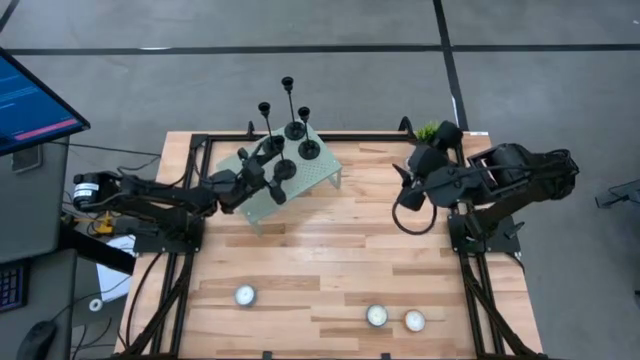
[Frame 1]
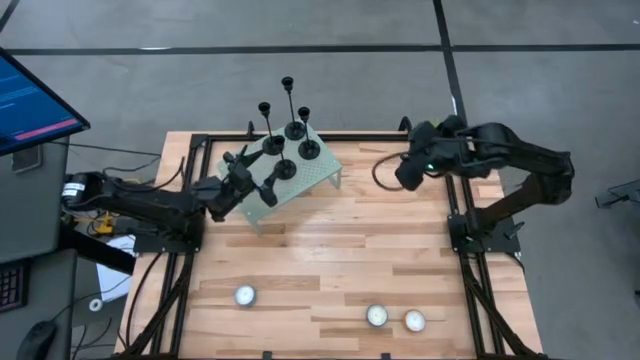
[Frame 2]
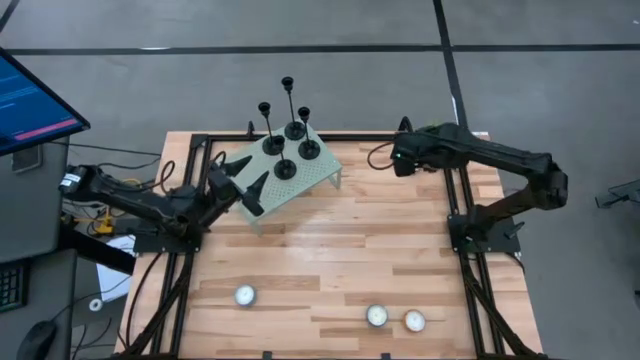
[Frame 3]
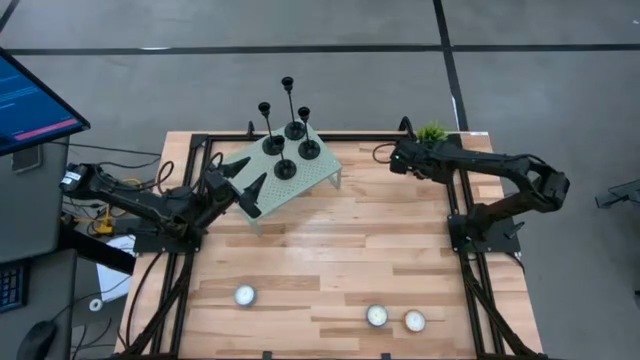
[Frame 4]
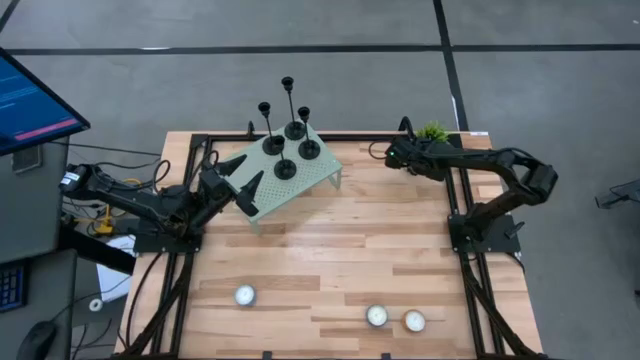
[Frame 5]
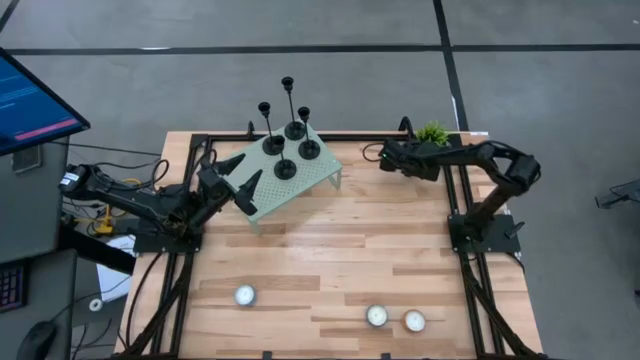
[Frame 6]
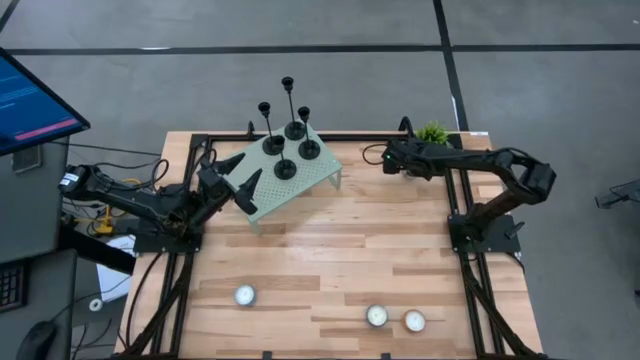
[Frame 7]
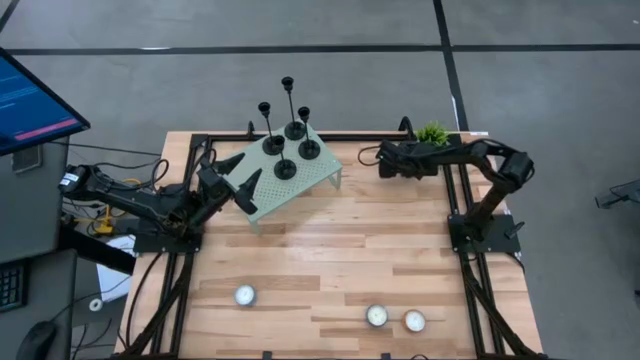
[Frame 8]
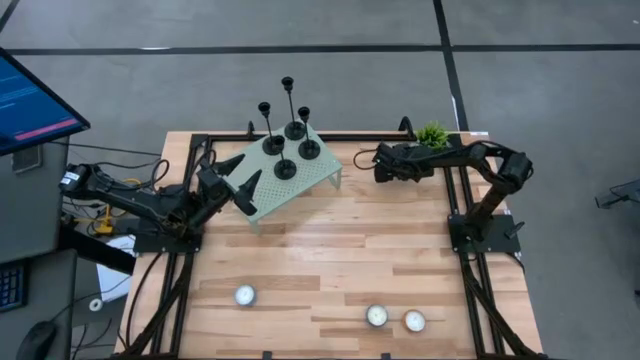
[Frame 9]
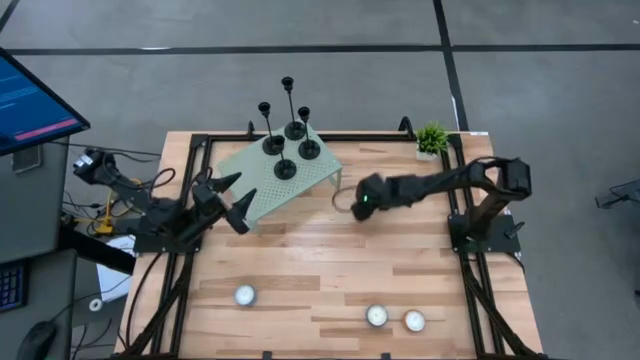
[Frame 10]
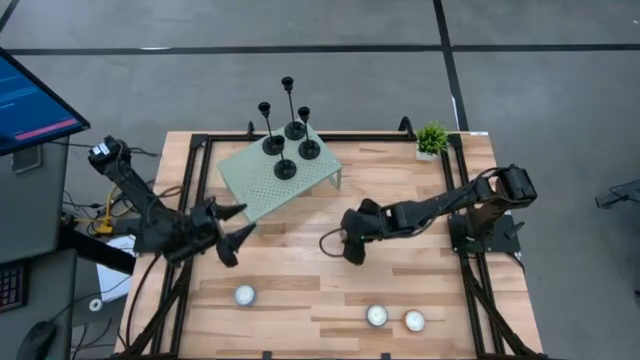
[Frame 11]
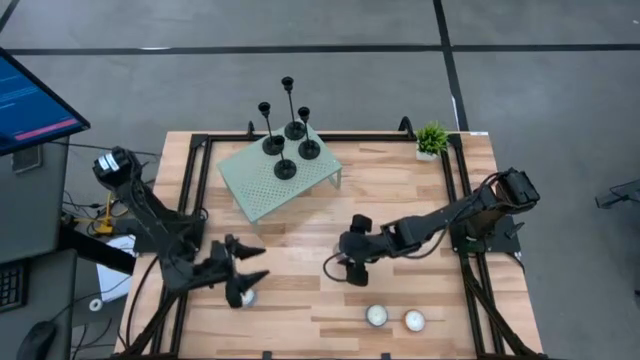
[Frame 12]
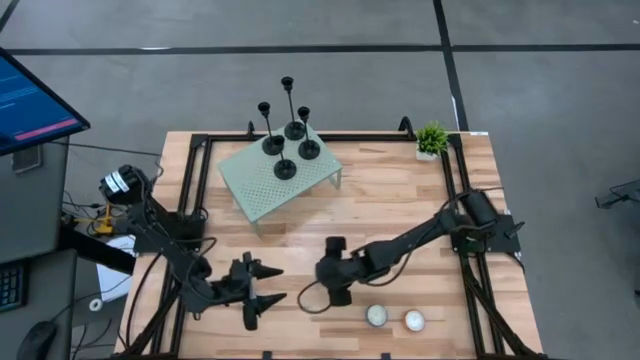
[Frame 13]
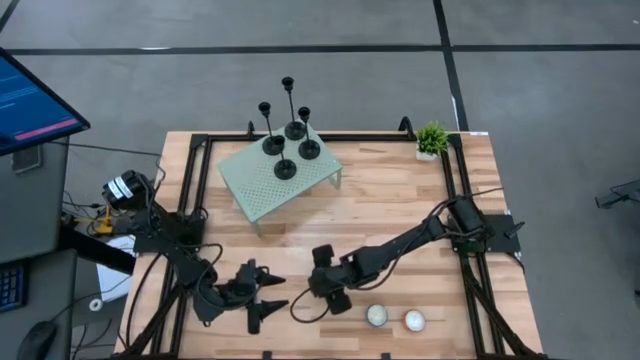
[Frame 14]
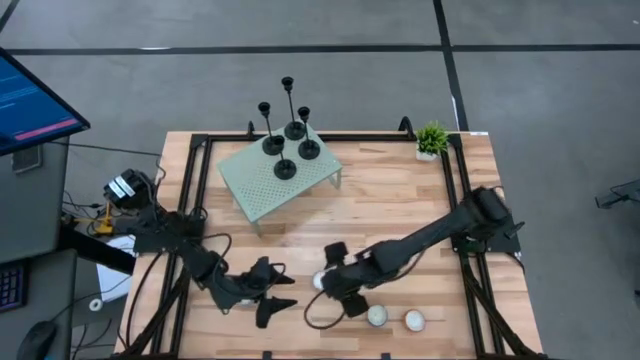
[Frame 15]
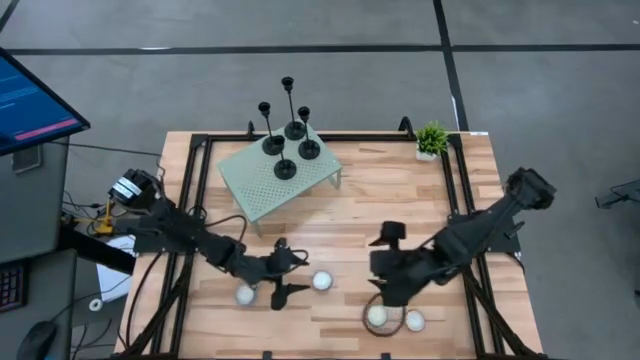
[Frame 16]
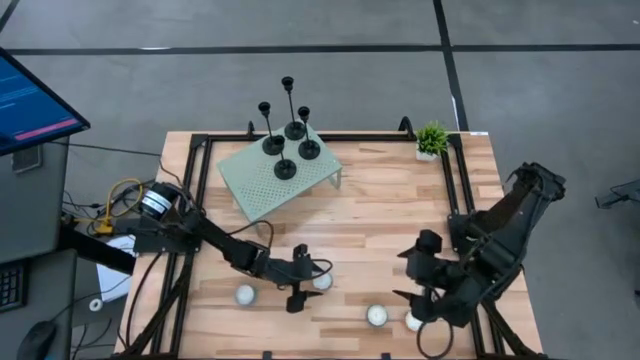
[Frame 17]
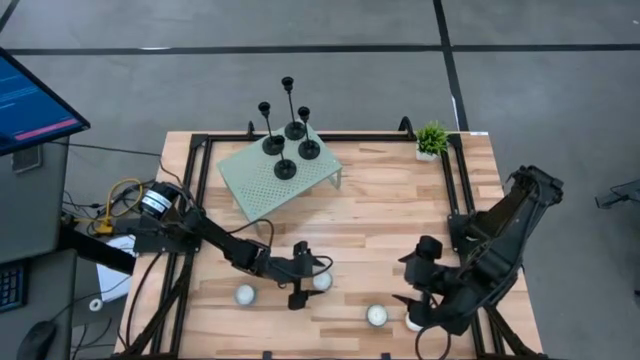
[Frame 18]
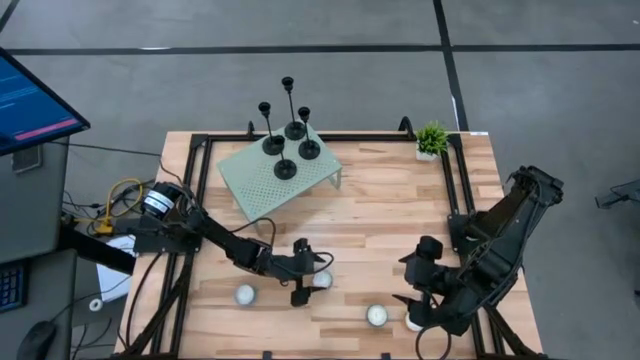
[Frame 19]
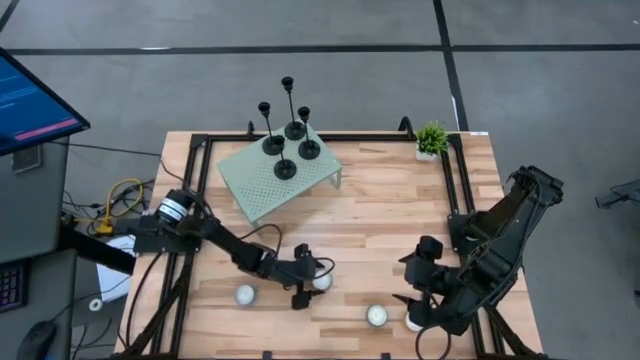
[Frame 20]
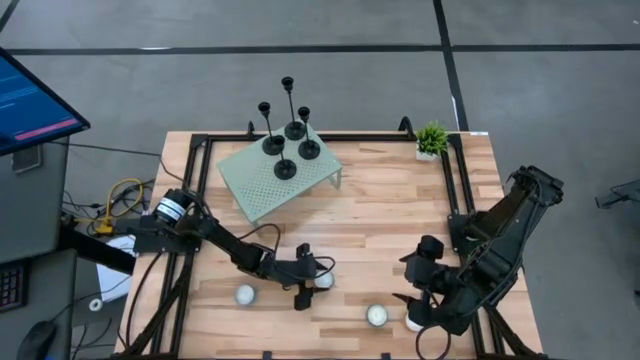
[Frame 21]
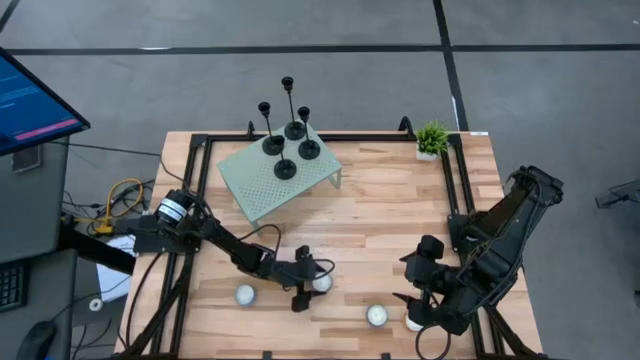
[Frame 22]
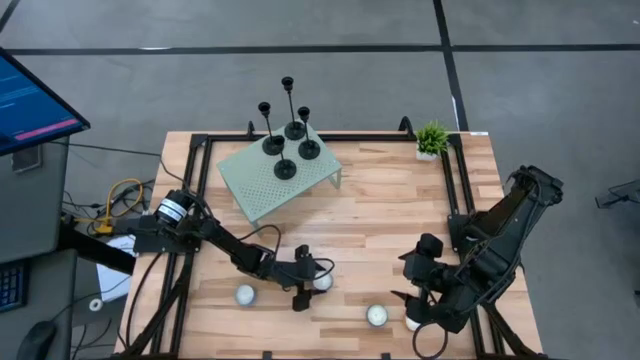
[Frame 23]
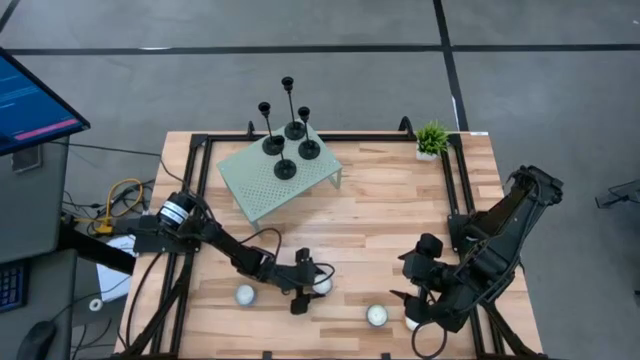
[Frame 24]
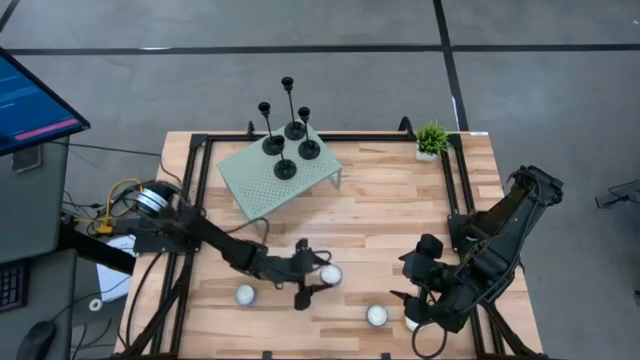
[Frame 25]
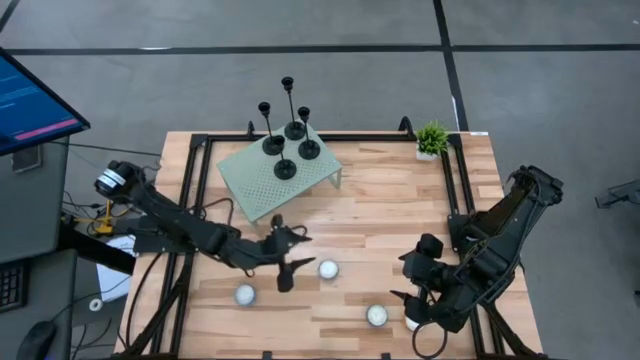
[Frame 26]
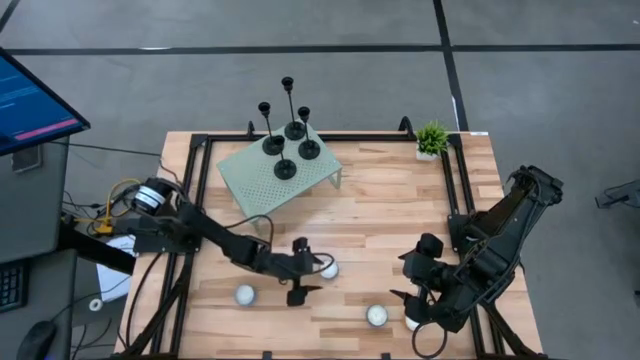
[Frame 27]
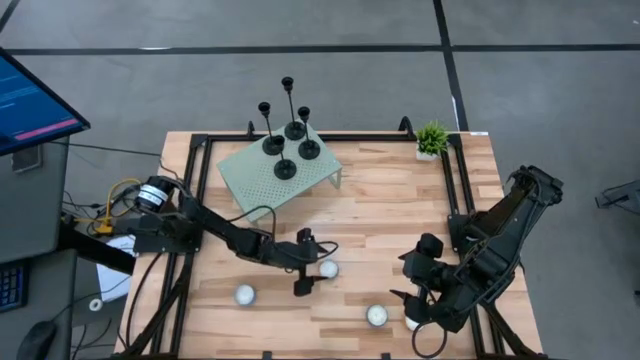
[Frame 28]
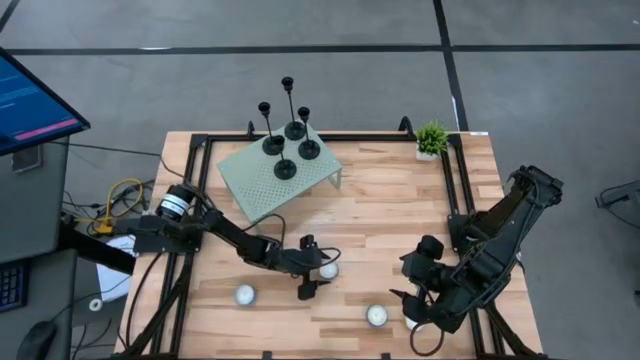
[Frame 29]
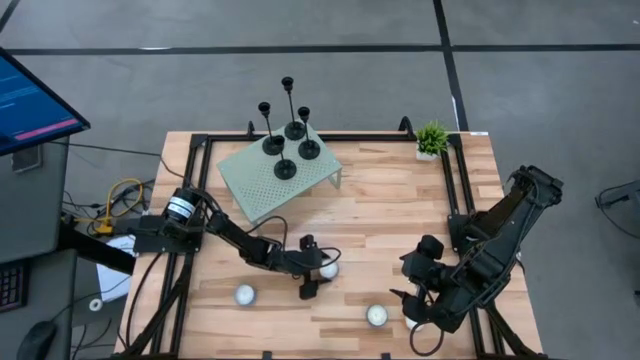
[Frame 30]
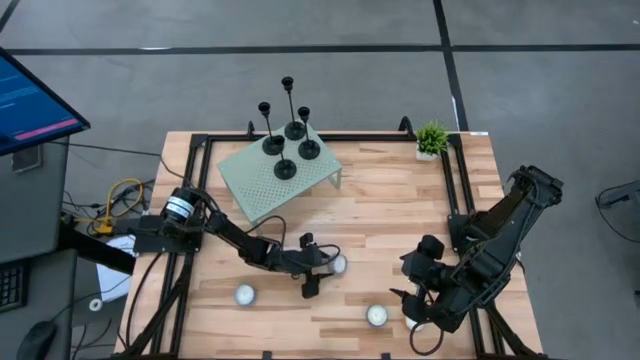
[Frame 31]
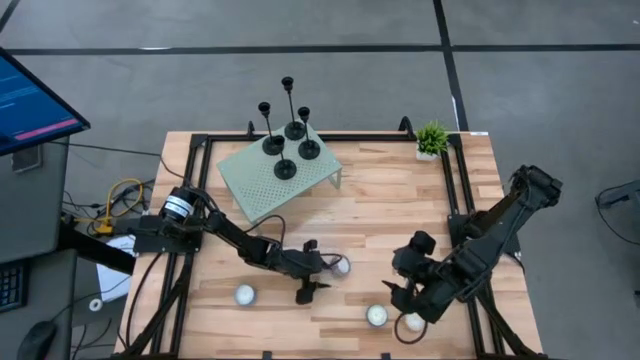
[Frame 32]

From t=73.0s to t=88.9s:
Task: Pick & Place candle stick holders
Put the red patterned scented candle on the shelf

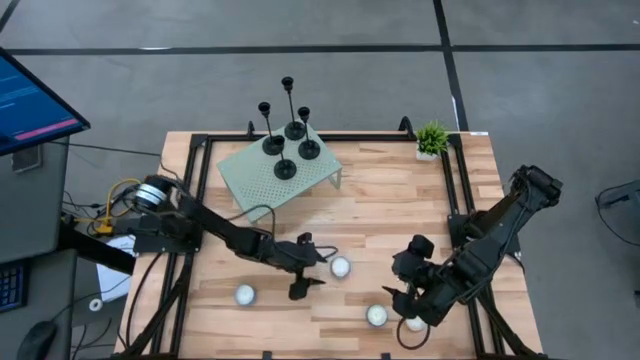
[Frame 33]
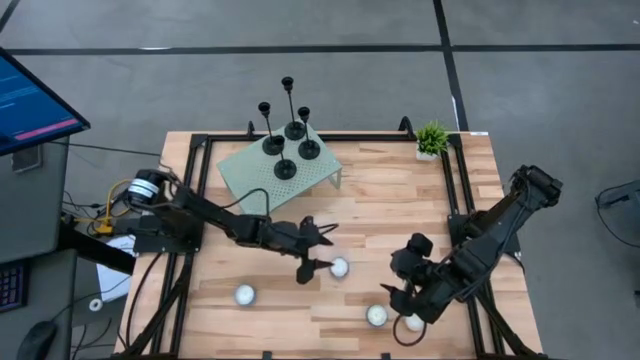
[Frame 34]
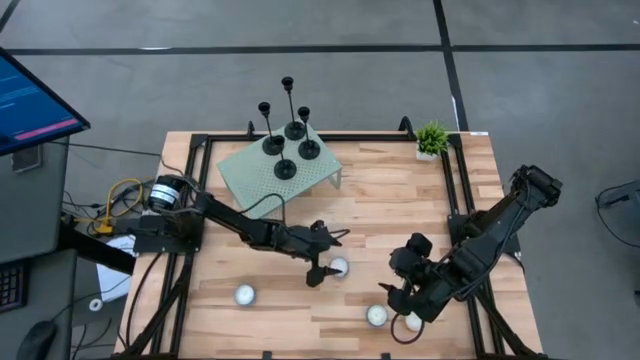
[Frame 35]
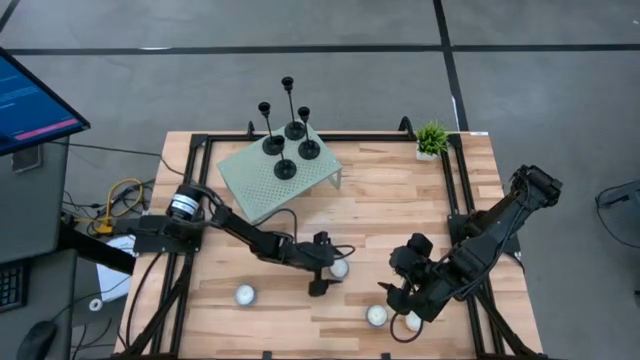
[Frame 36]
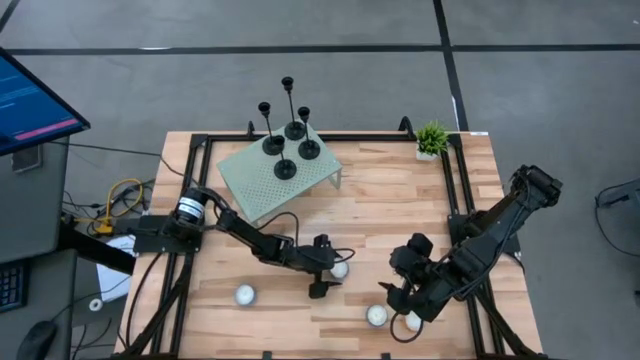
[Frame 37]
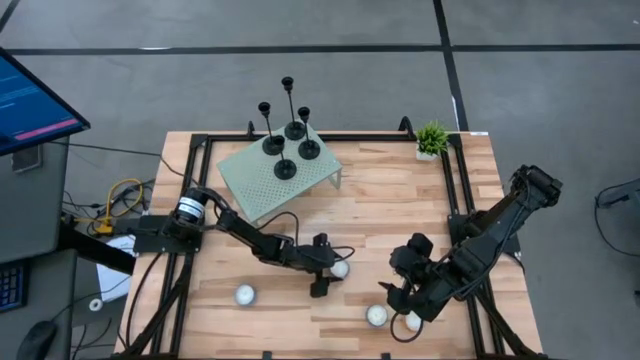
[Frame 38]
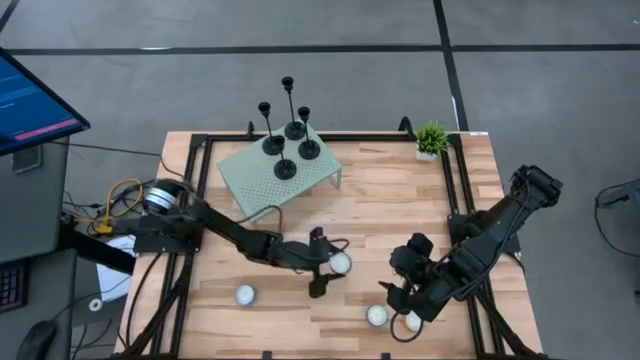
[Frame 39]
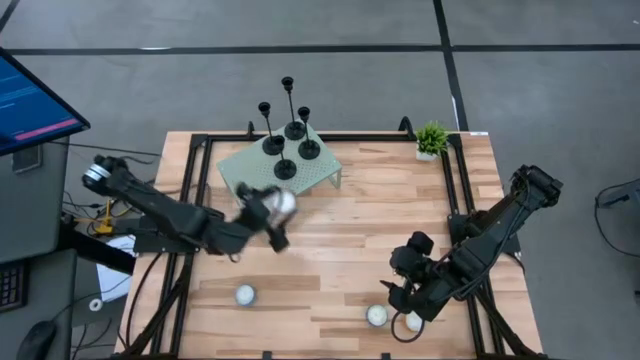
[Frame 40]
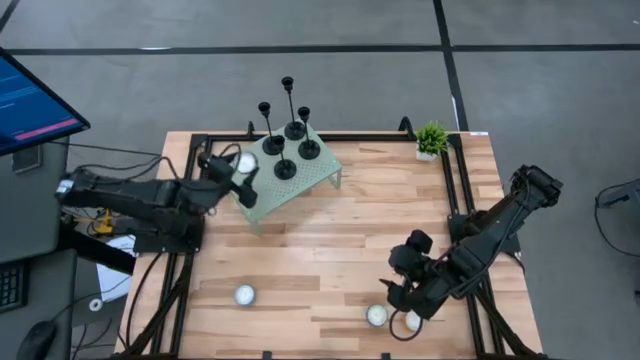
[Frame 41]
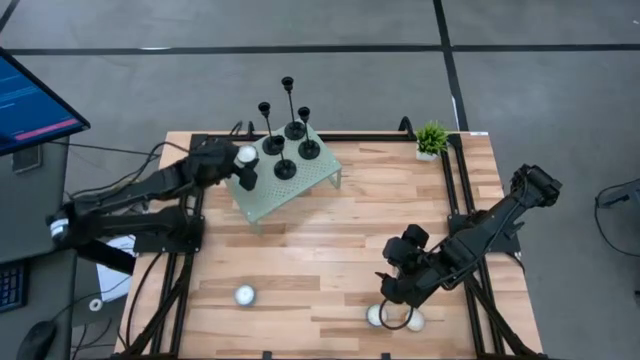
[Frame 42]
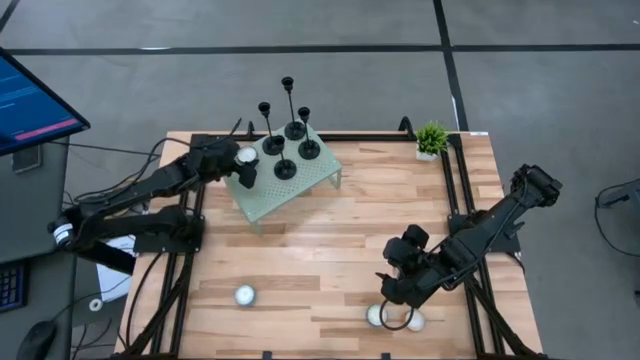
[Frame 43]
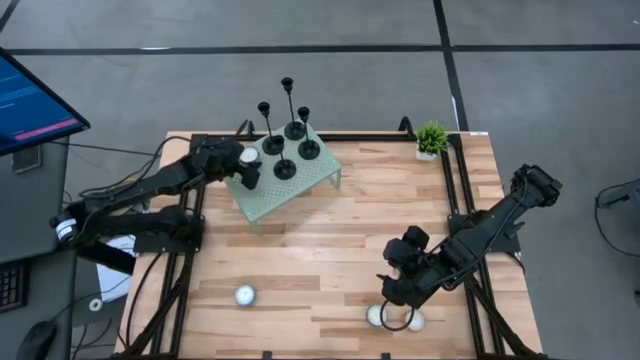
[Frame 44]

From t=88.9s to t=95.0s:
Put the red patterned scented candle on the shelf
